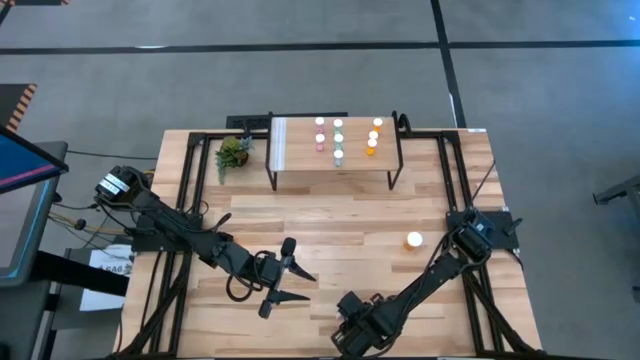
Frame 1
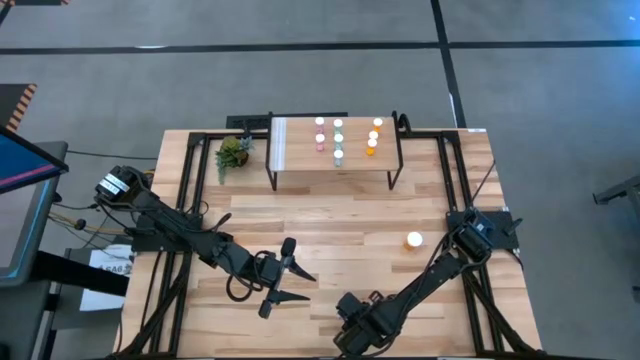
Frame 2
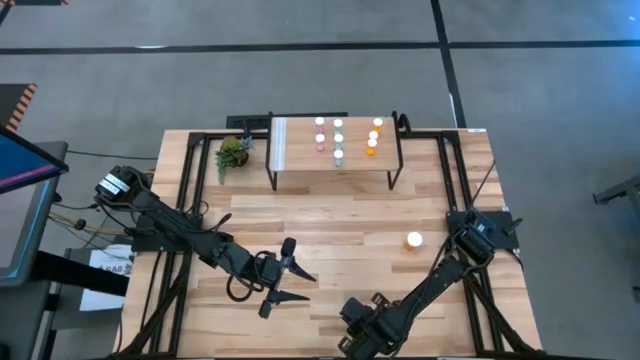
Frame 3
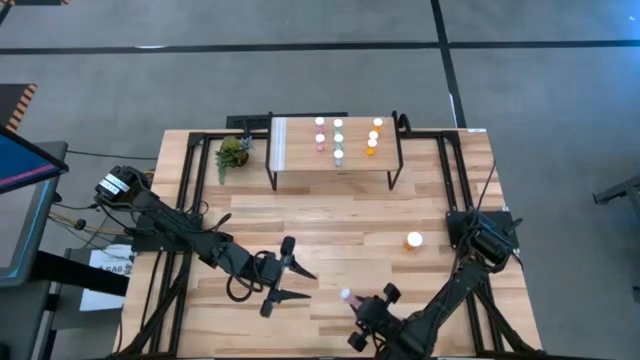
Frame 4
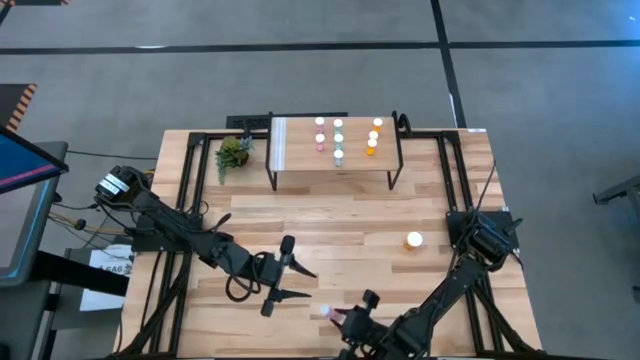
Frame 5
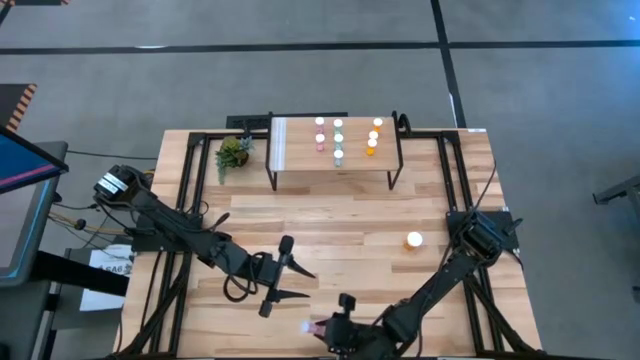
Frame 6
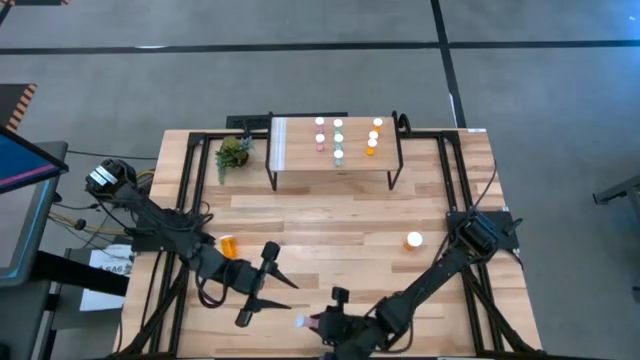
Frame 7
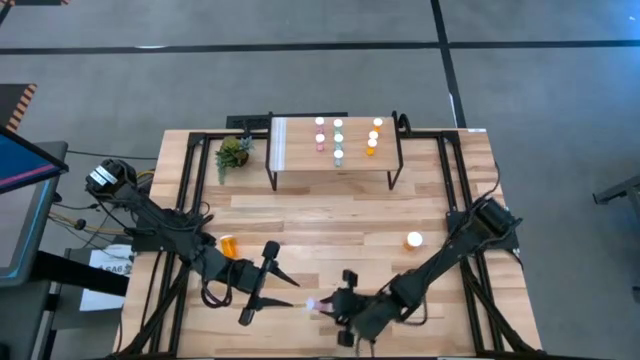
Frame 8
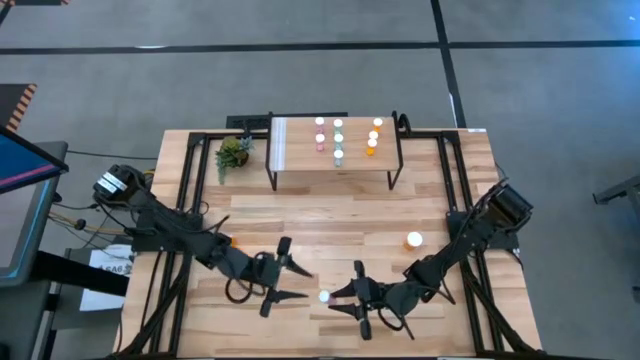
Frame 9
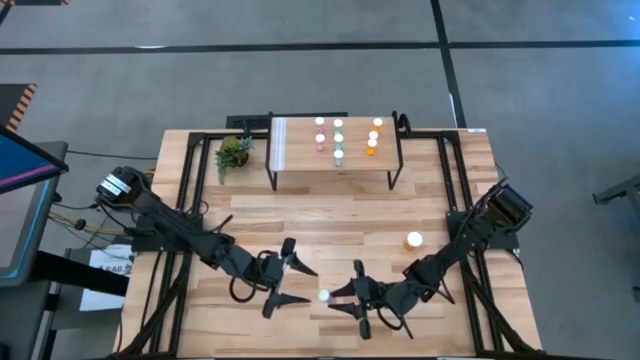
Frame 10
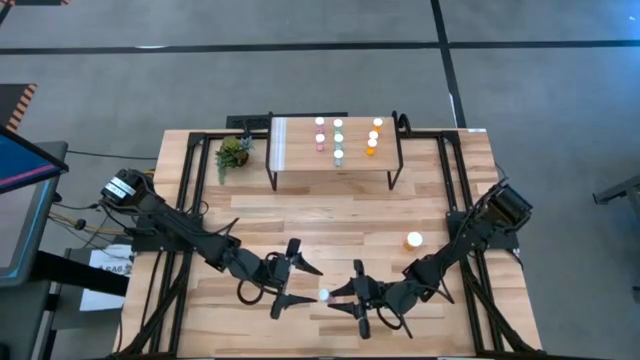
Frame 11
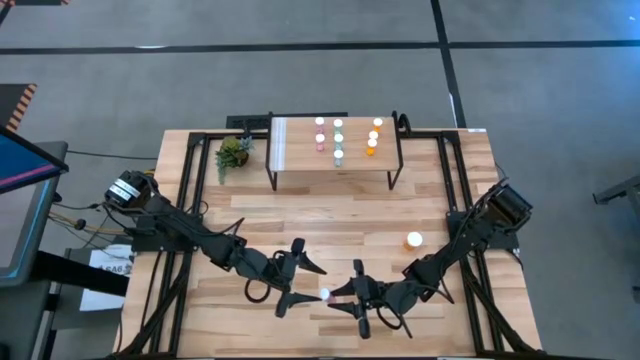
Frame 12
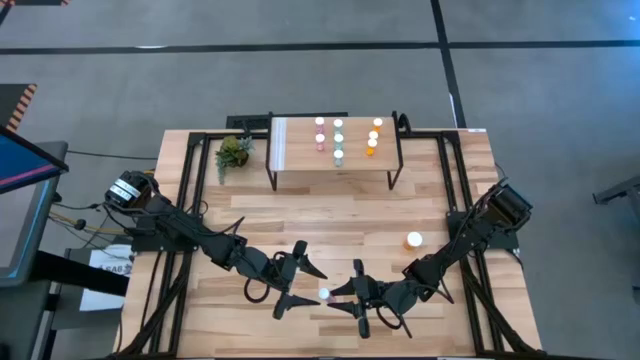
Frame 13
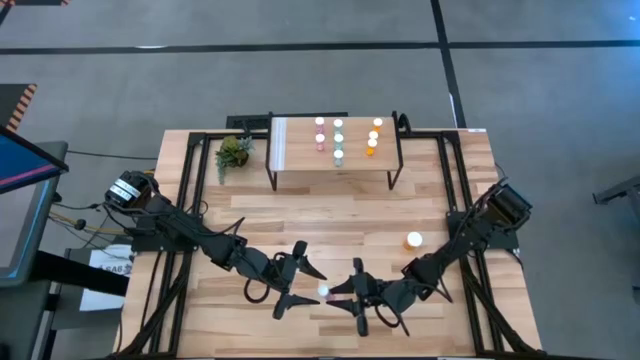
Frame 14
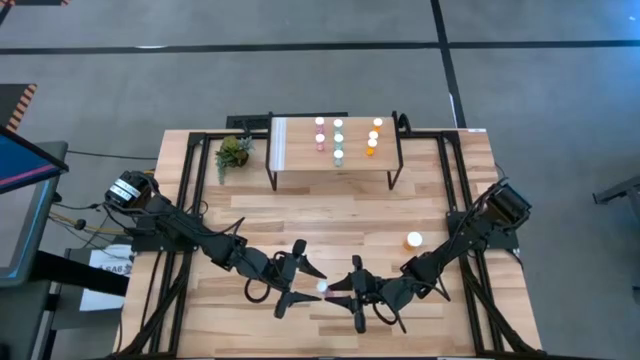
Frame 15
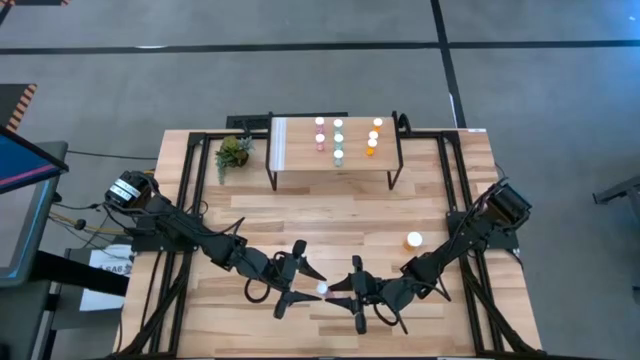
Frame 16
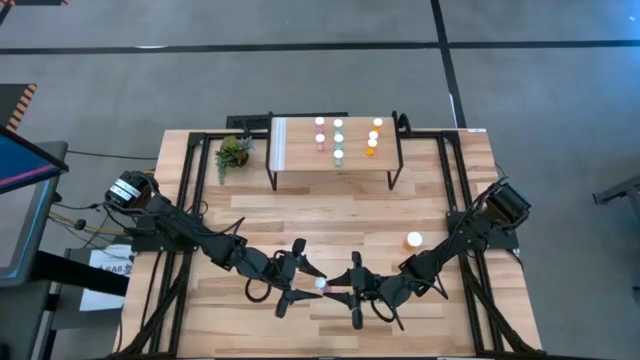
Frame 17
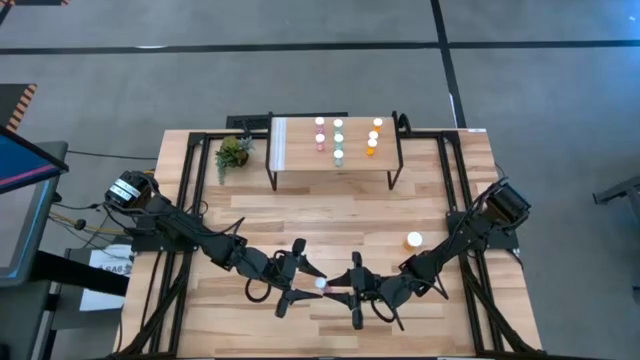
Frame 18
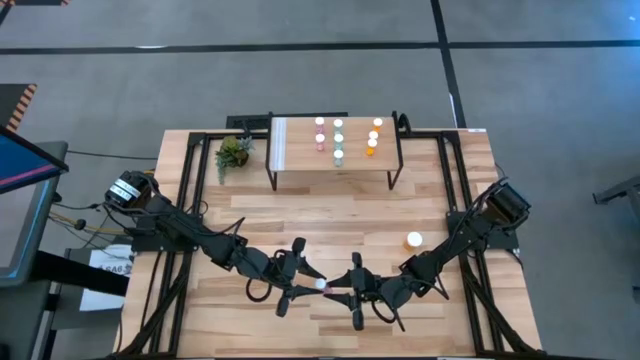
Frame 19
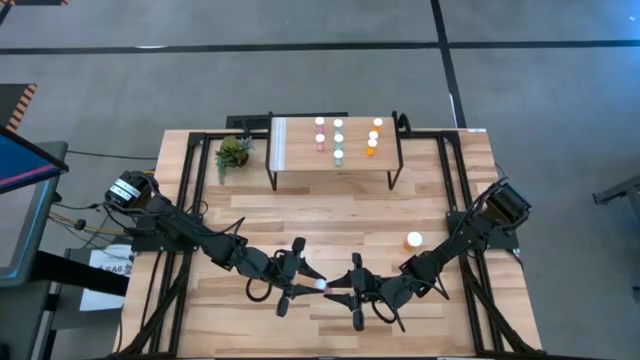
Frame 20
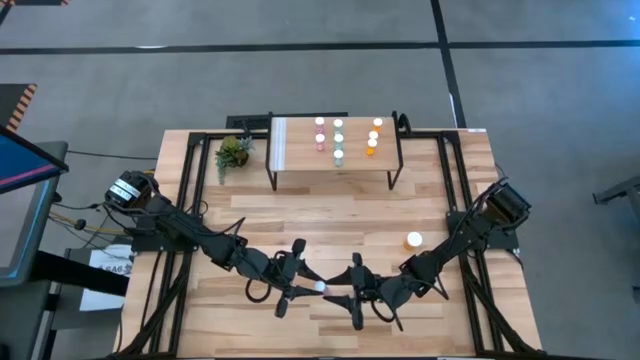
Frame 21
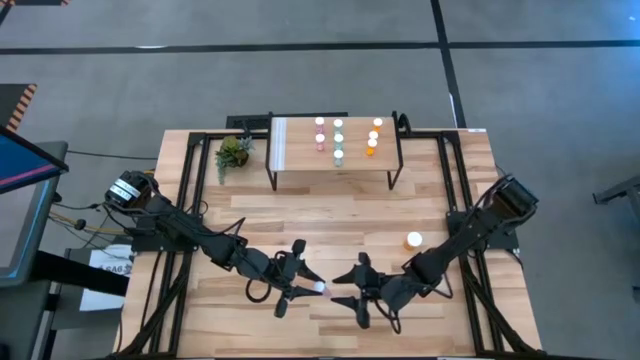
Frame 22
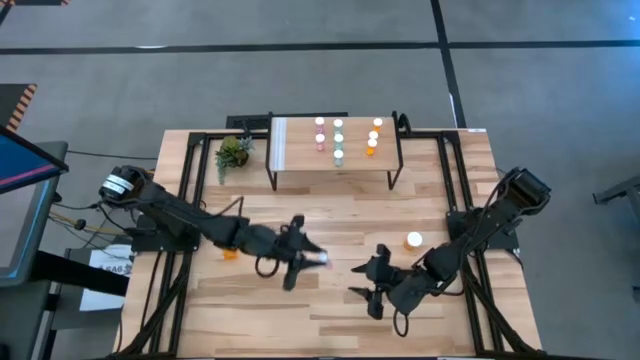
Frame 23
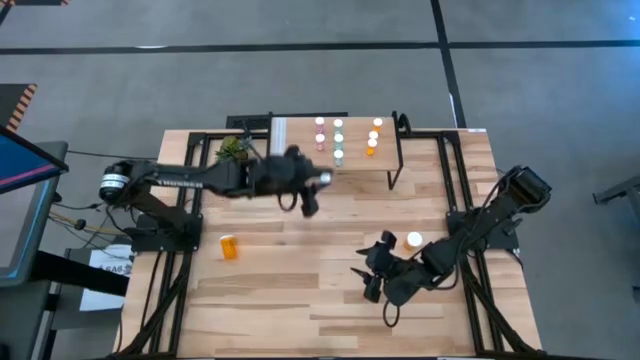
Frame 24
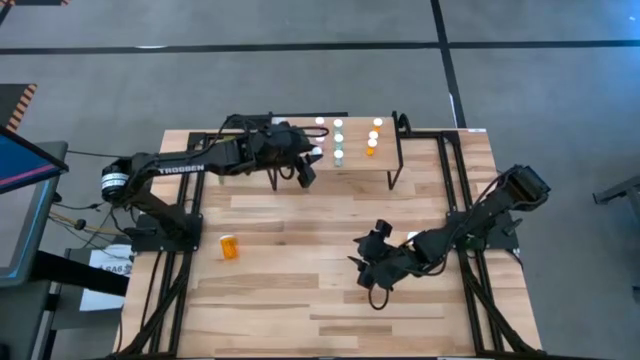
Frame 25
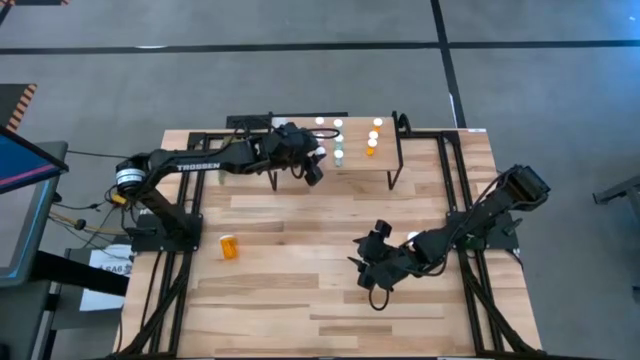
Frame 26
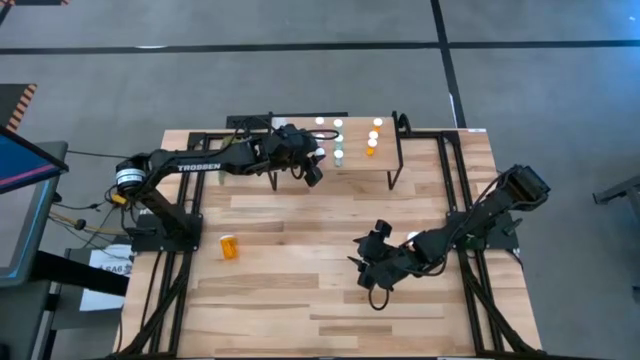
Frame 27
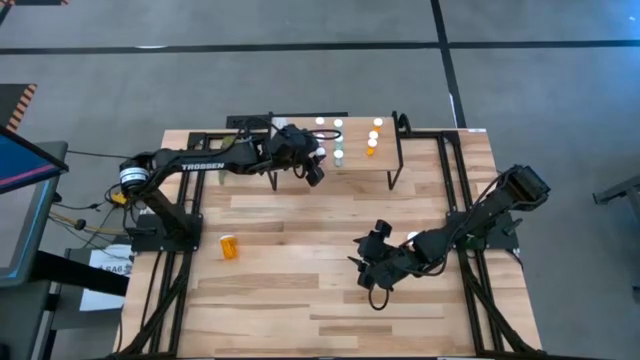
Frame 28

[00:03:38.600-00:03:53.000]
Task: Pick and place medicine bottles onto shelf by color
Put the pink pill bottle on the shelf aligned with the other pink pill bottles

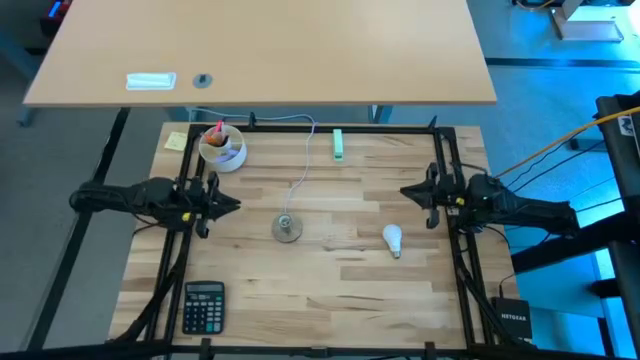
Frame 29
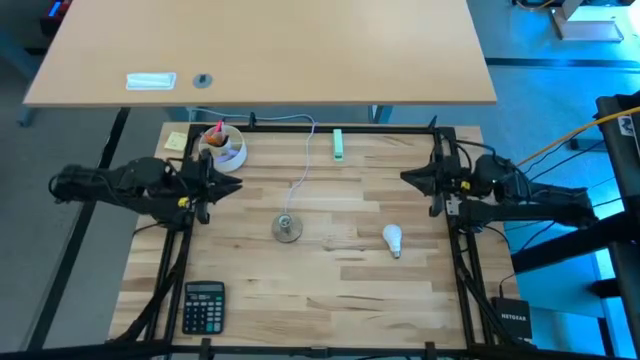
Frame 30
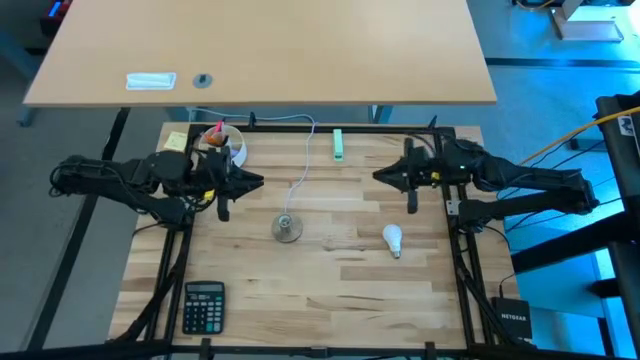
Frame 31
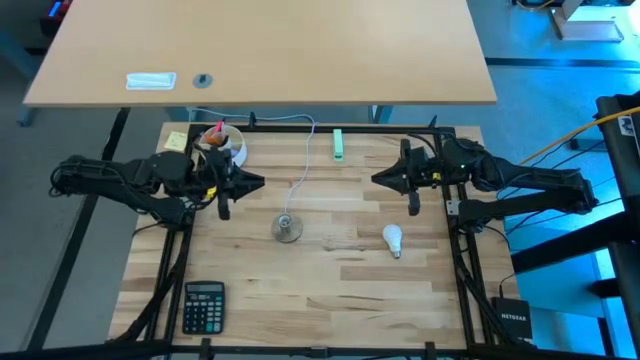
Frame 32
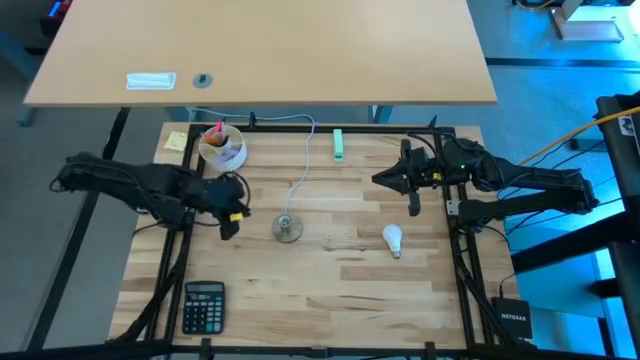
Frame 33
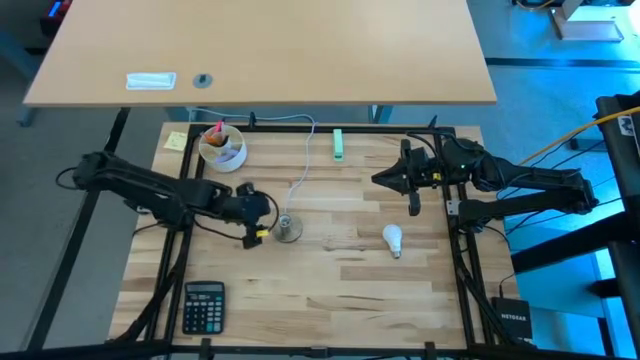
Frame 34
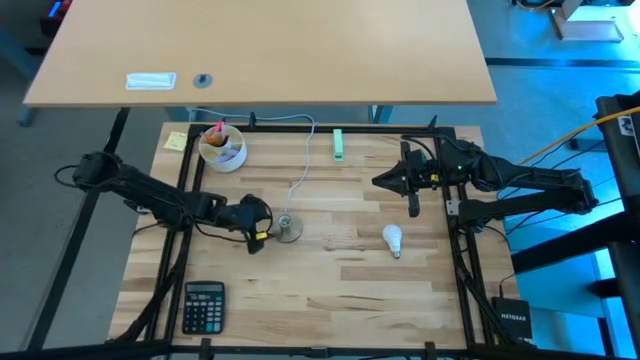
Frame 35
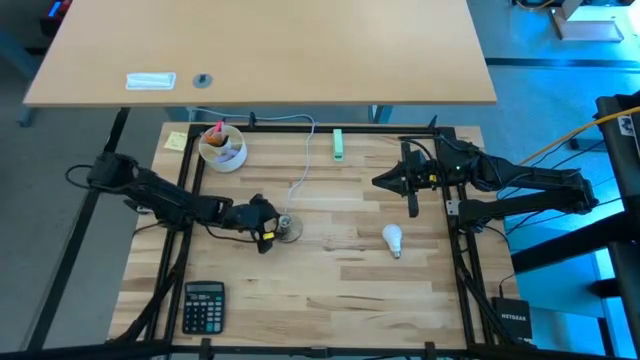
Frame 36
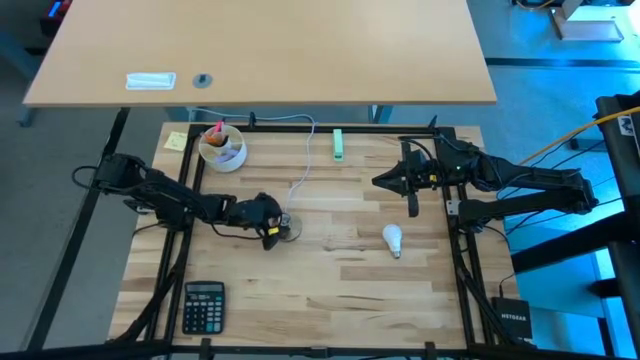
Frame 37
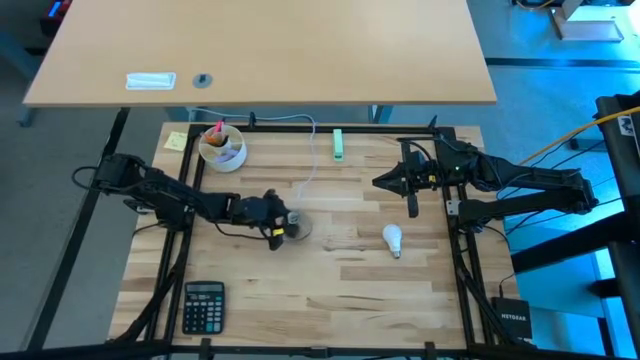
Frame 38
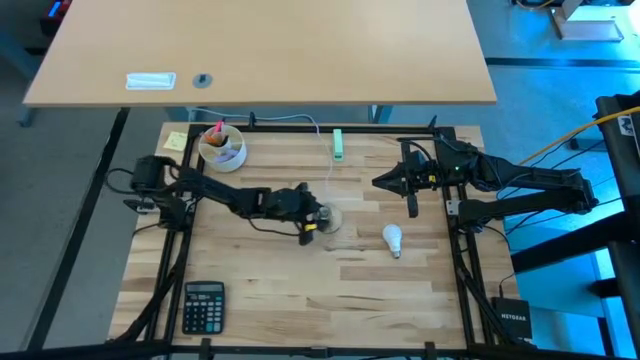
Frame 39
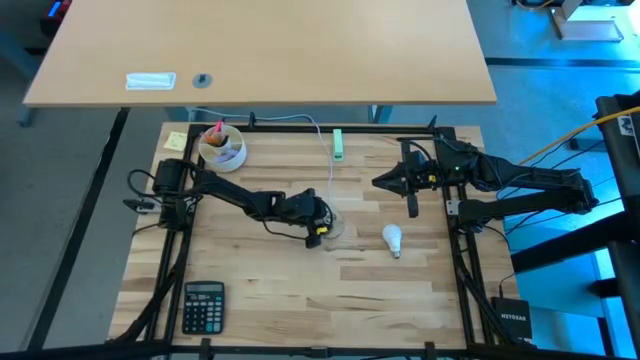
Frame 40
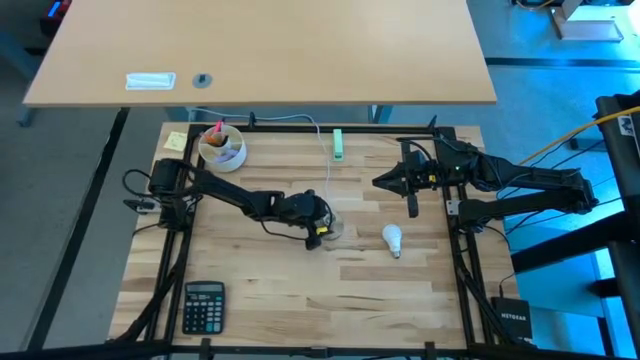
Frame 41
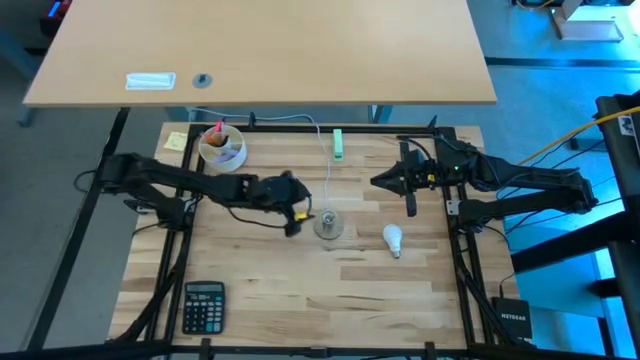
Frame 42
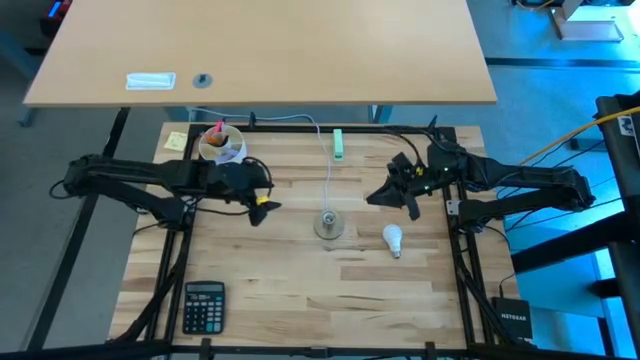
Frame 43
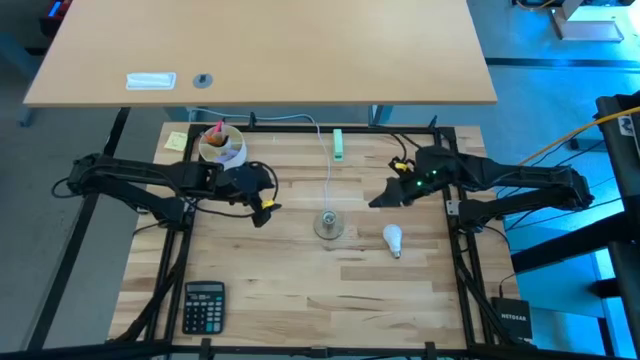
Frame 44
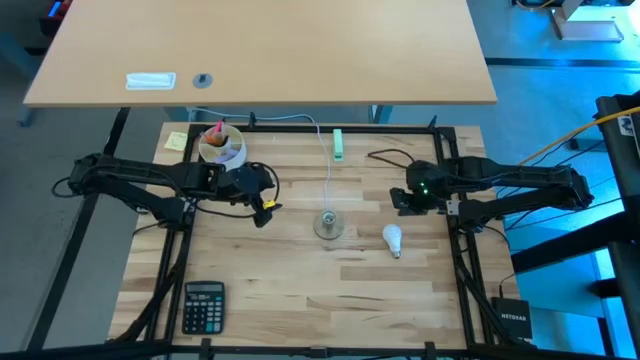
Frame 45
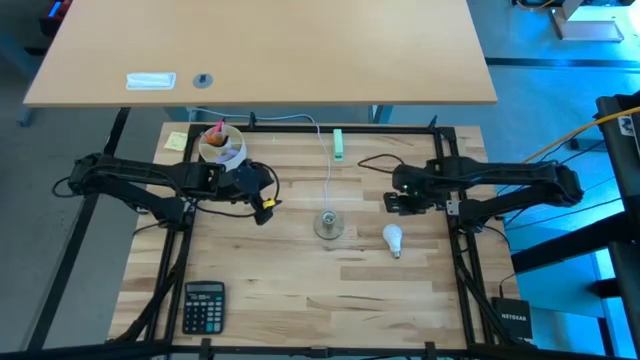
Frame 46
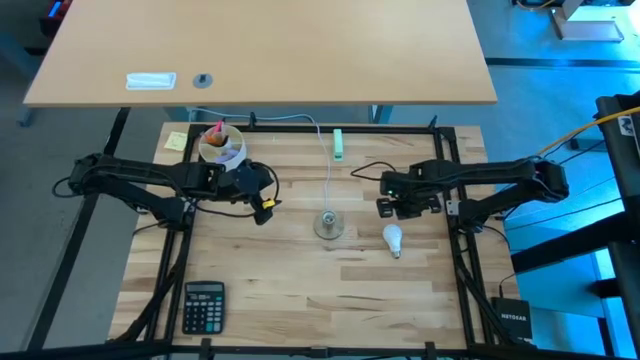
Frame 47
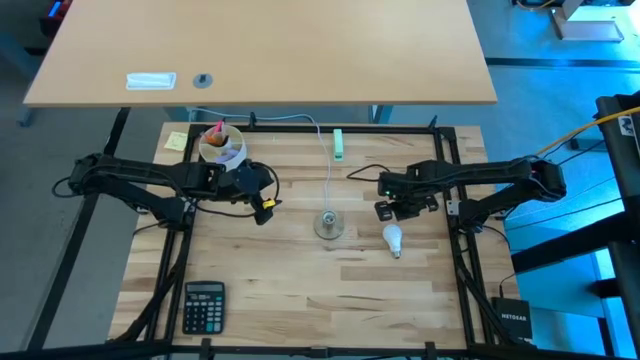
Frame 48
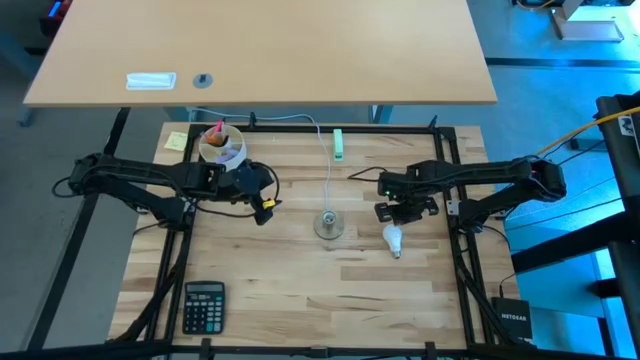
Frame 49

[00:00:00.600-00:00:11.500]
Task: Screw lightbulb
Prepare the lamp to insert the lightbulb
